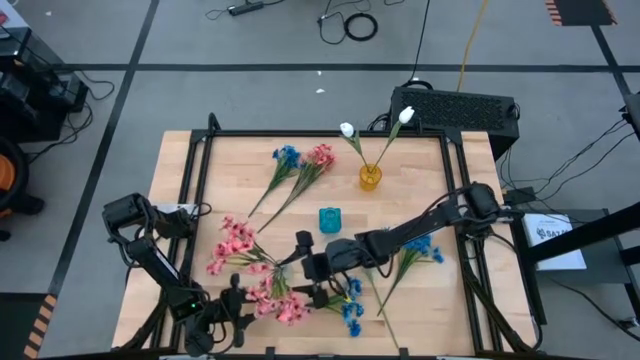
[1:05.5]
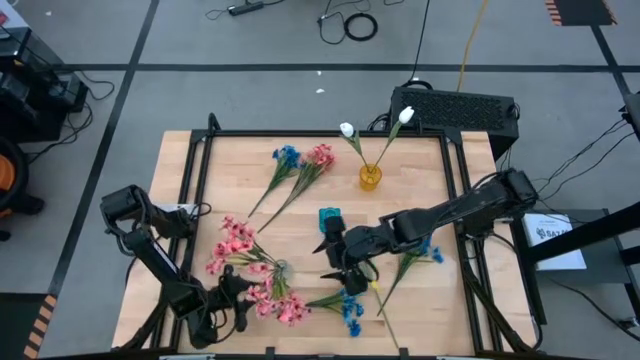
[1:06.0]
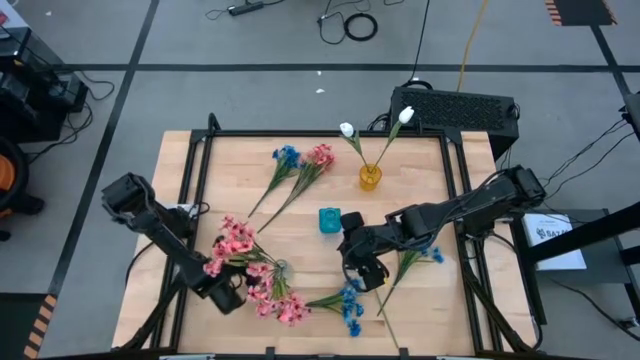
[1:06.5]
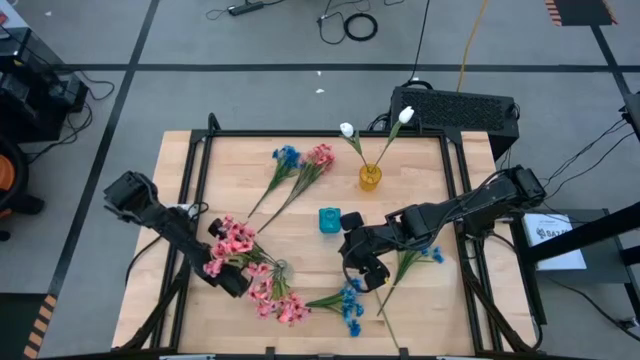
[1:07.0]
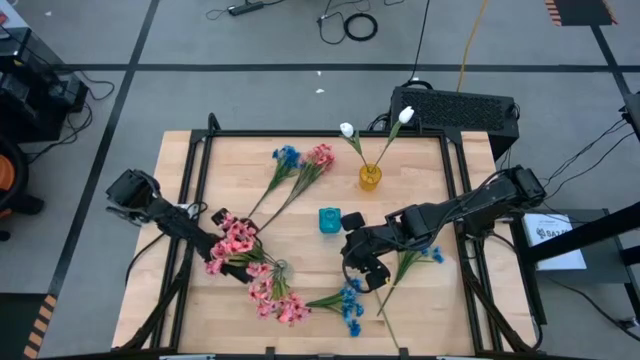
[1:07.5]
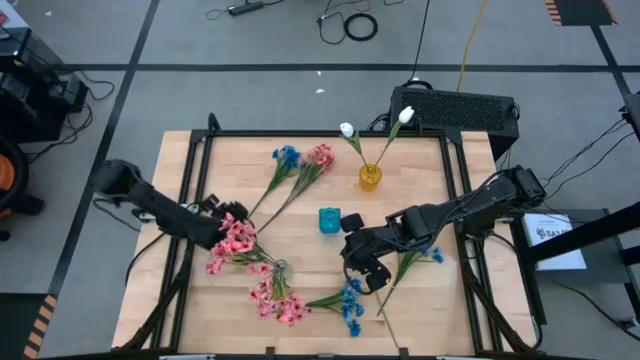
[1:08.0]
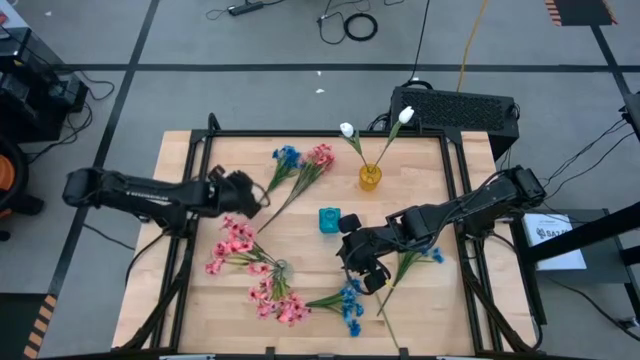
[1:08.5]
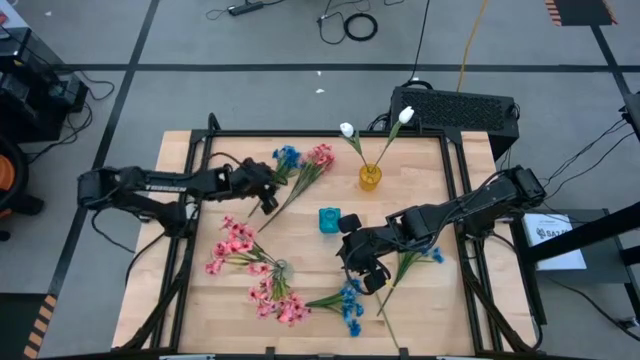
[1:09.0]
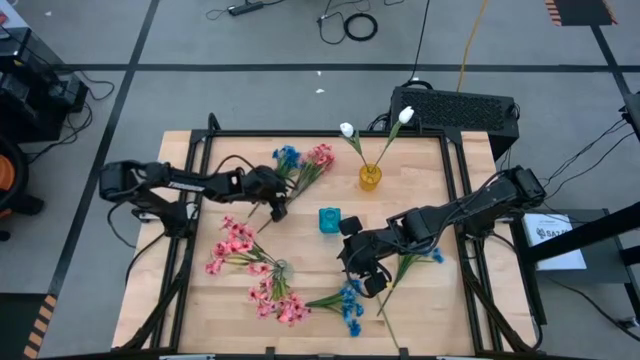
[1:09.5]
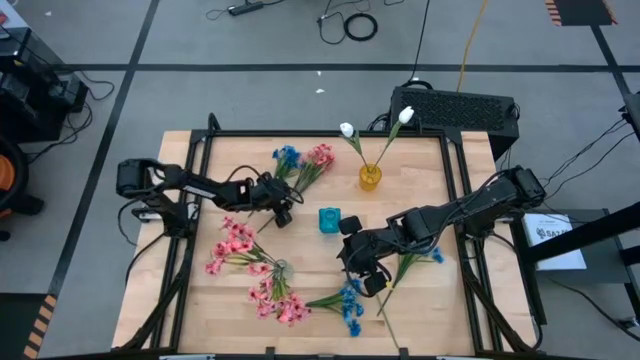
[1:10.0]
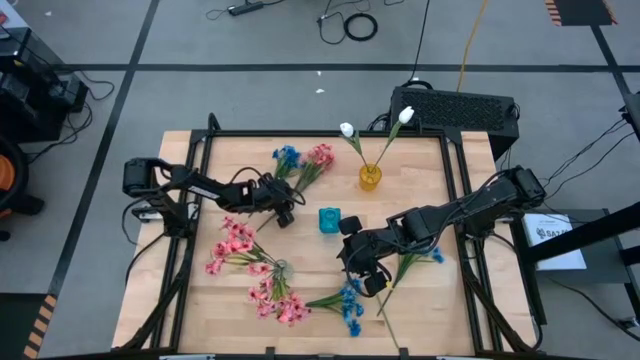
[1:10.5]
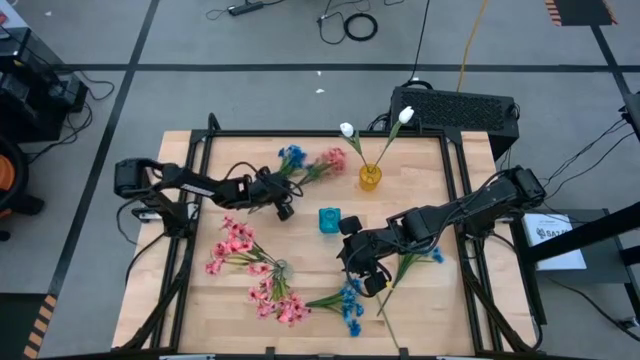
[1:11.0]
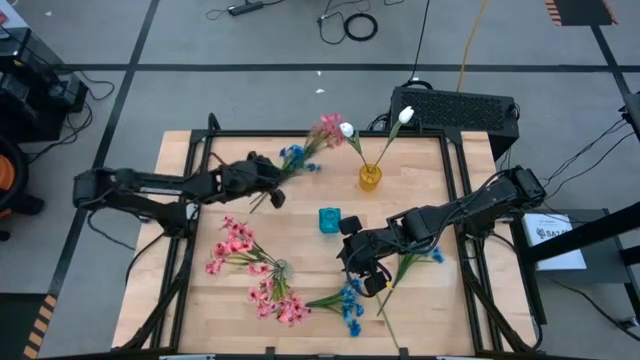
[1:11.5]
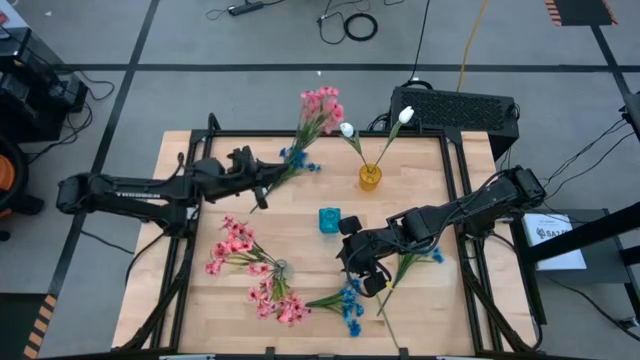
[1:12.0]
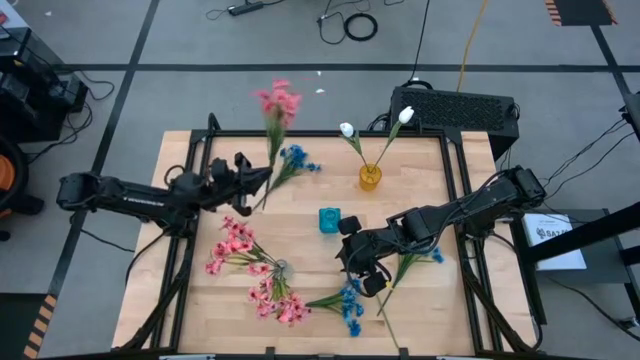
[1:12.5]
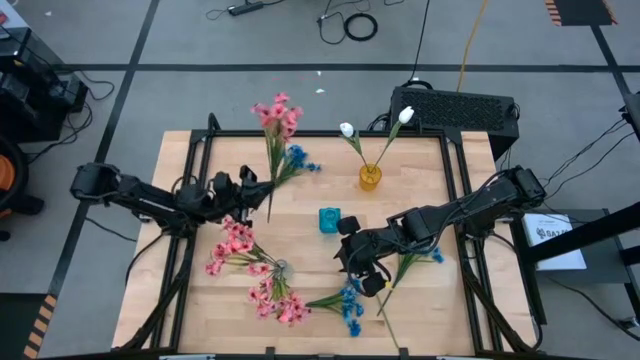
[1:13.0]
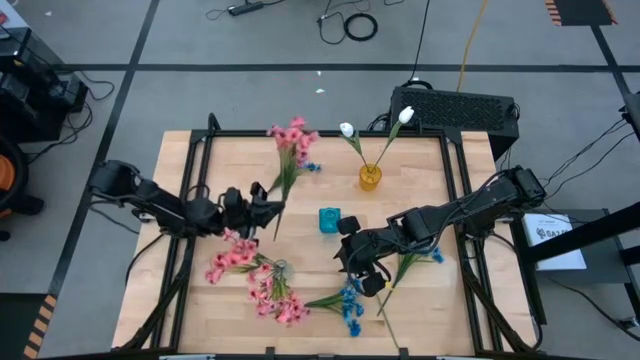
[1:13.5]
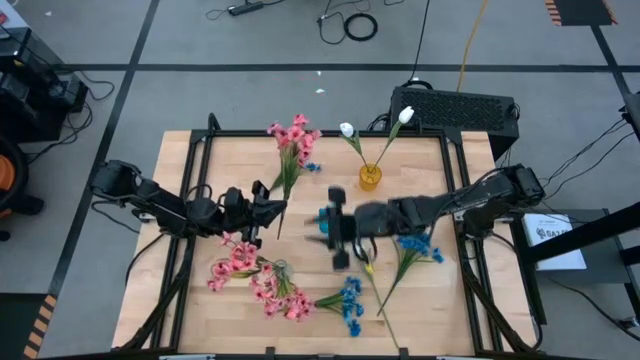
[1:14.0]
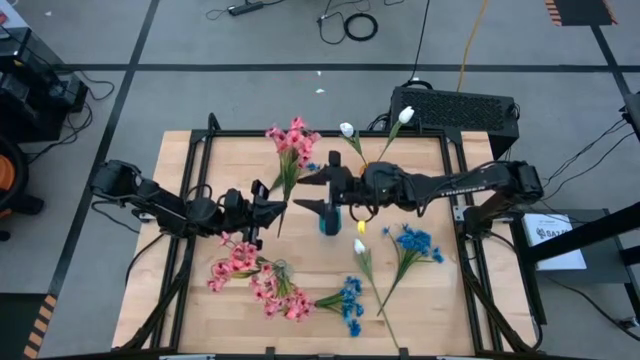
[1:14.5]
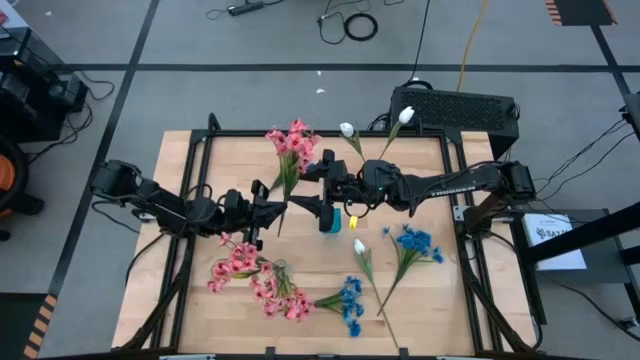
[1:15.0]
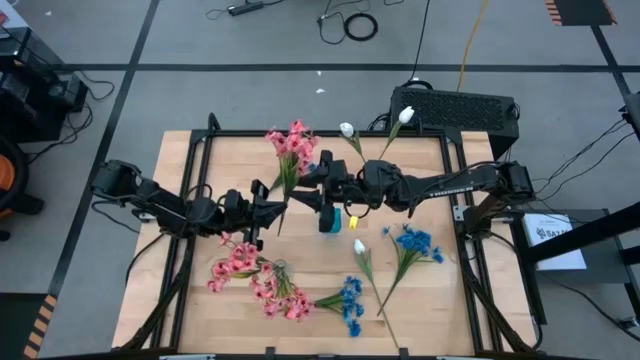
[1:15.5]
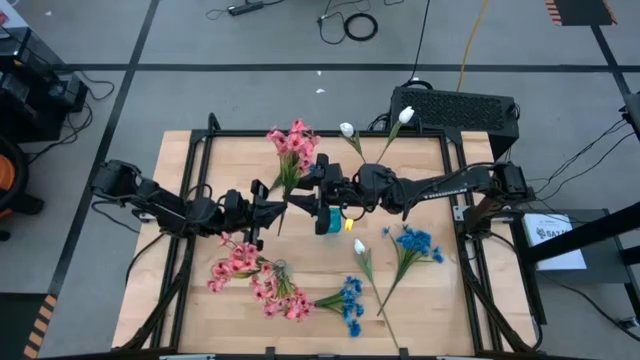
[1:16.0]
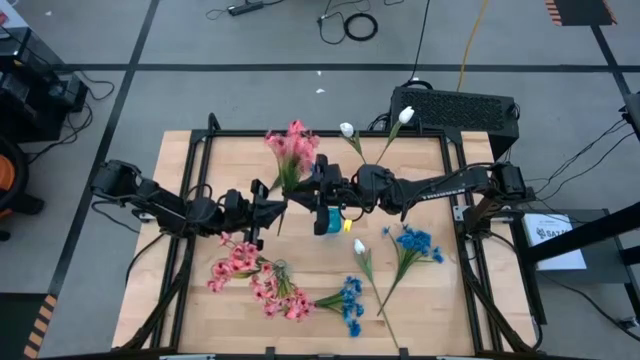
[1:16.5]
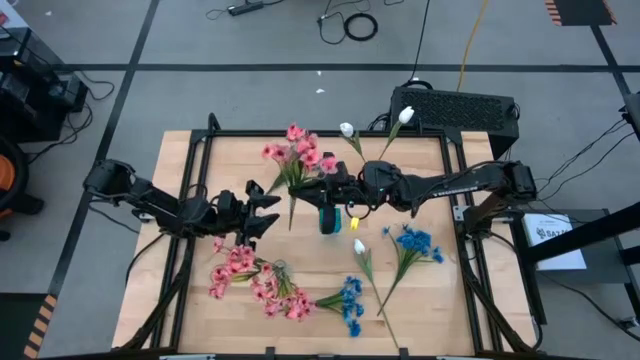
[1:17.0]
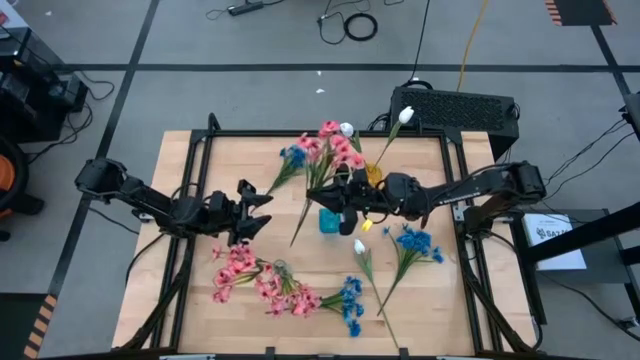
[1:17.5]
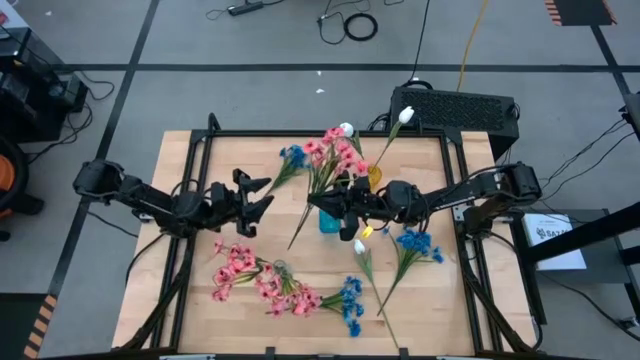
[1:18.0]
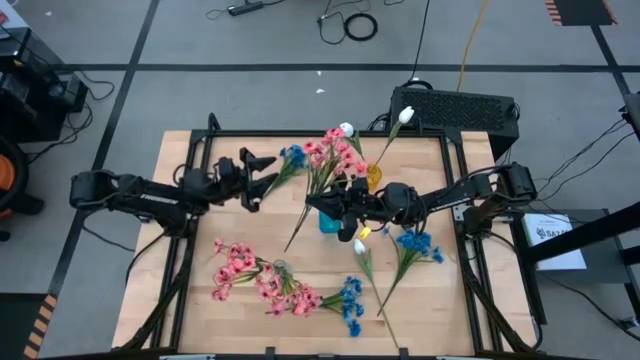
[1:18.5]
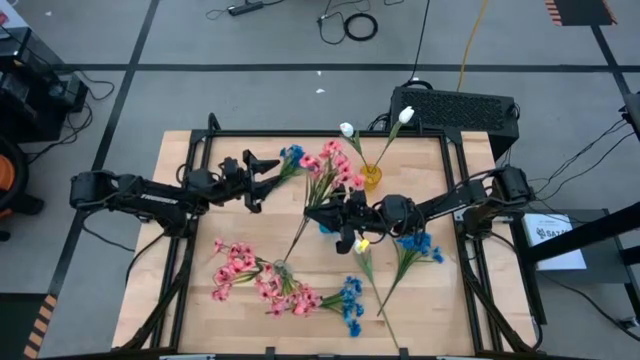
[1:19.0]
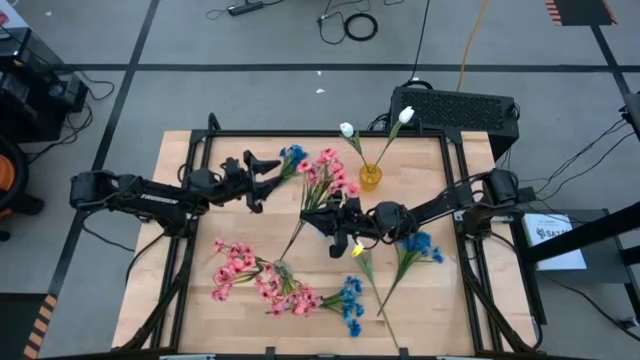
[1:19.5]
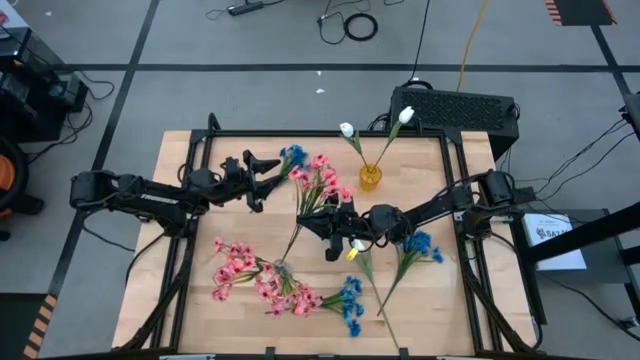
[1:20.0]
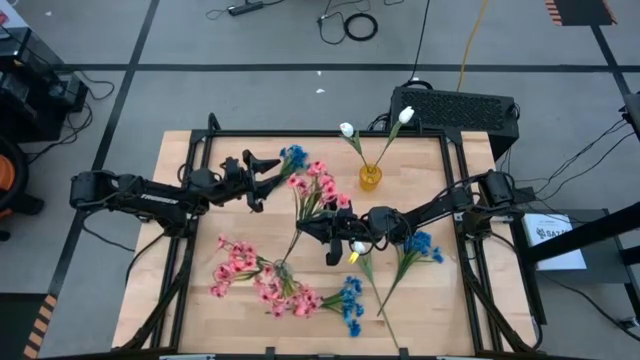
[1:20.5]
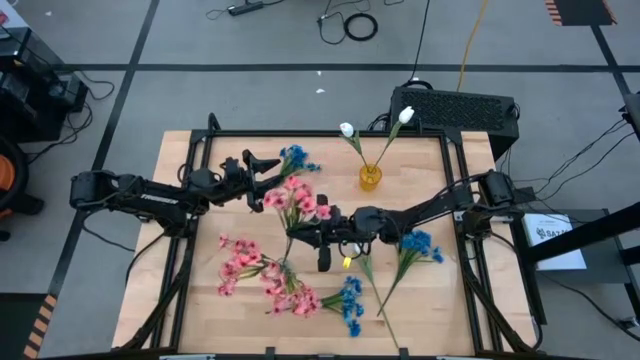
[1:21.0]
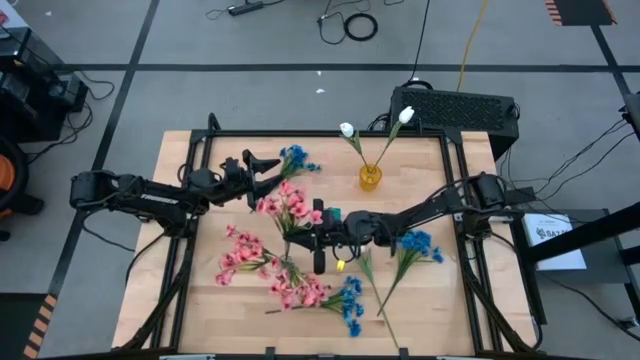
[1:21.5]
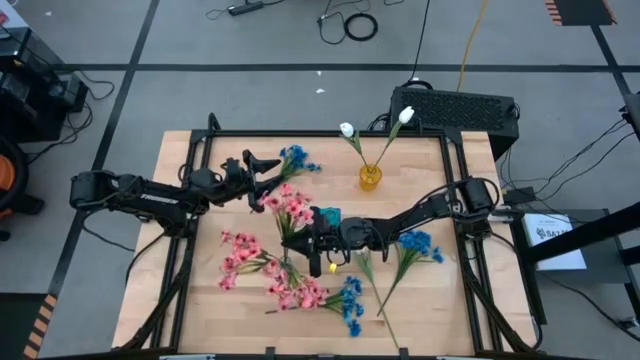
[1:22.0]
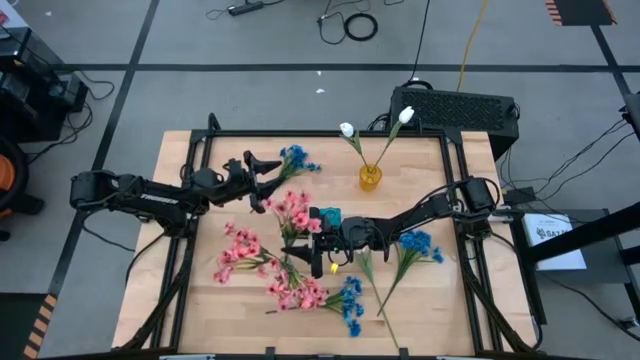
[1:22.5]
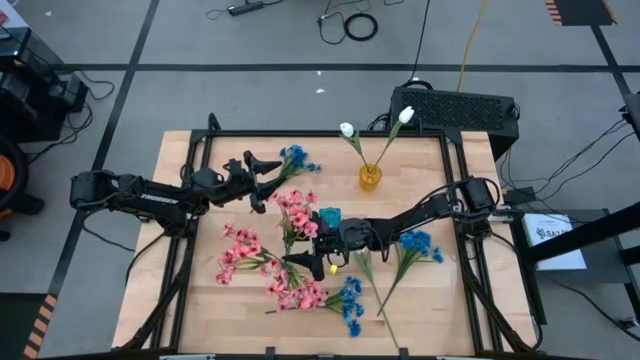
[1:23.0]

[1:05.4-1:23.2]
Task: Sort flowers into vase by color
Put the pink flowers into the transparent vase

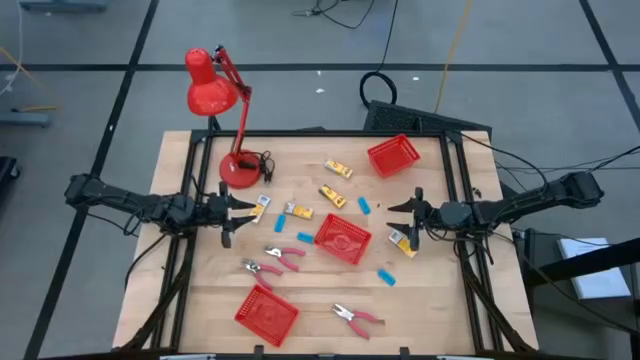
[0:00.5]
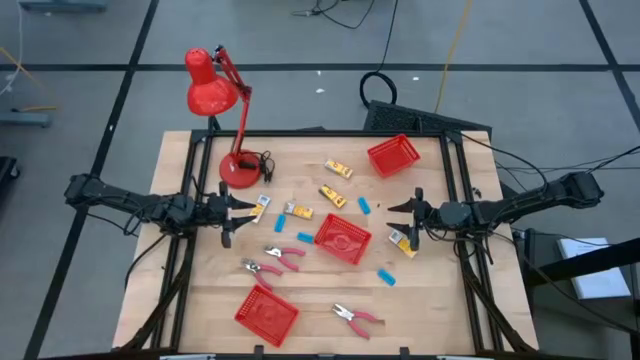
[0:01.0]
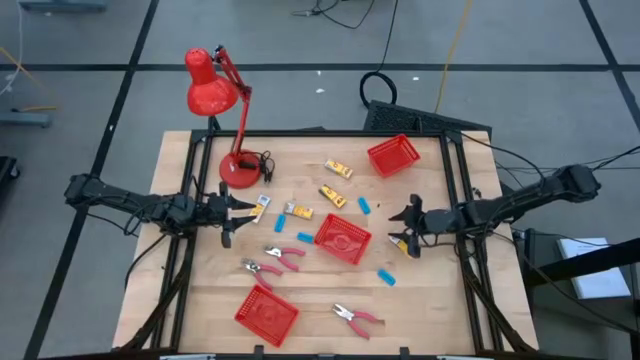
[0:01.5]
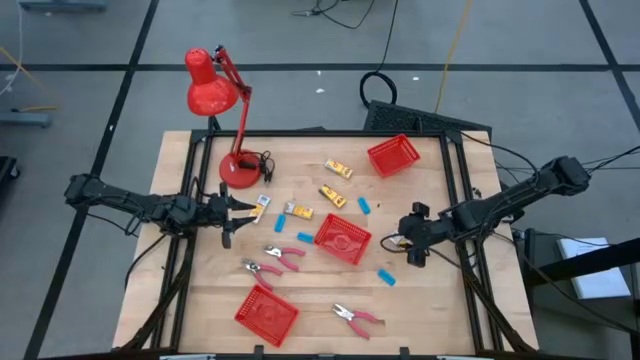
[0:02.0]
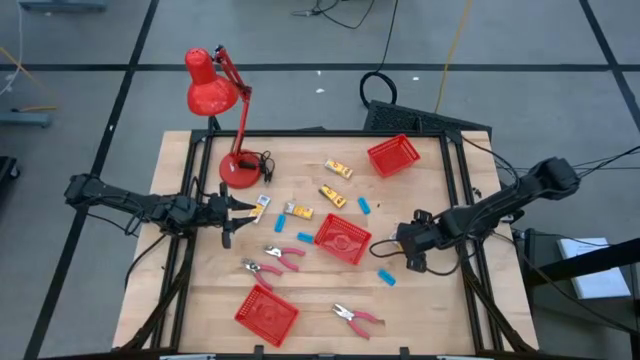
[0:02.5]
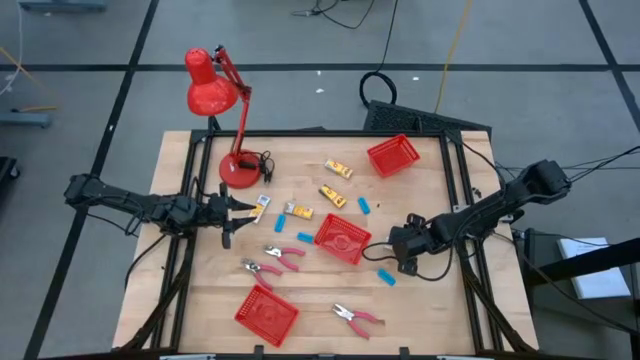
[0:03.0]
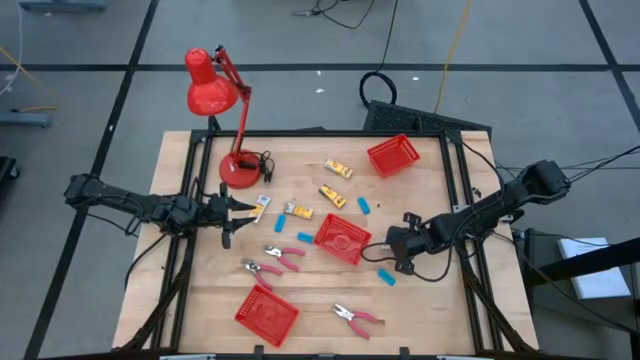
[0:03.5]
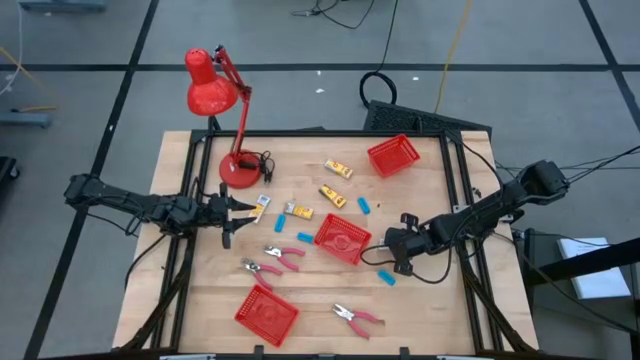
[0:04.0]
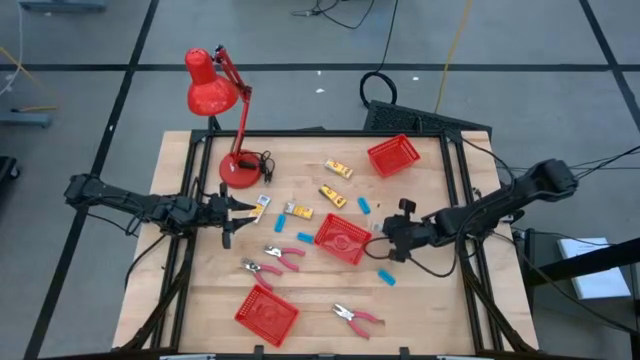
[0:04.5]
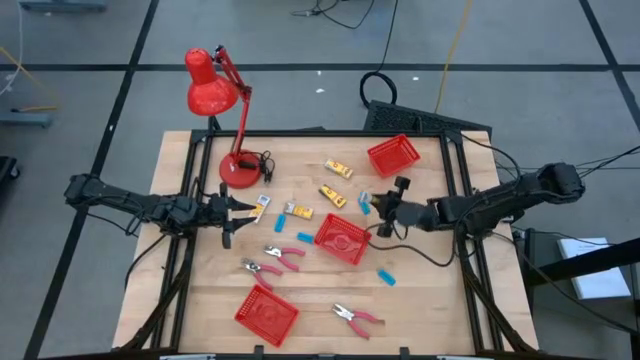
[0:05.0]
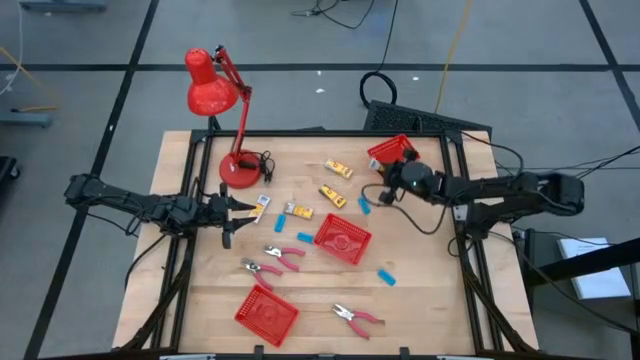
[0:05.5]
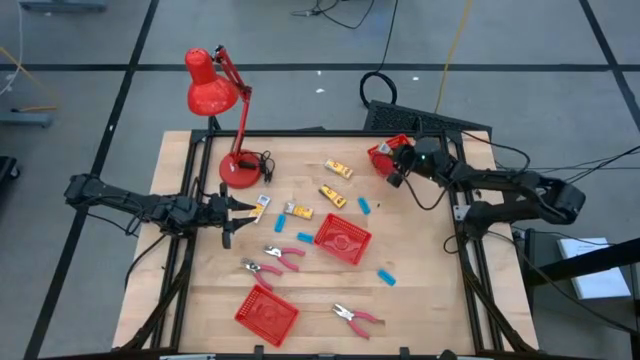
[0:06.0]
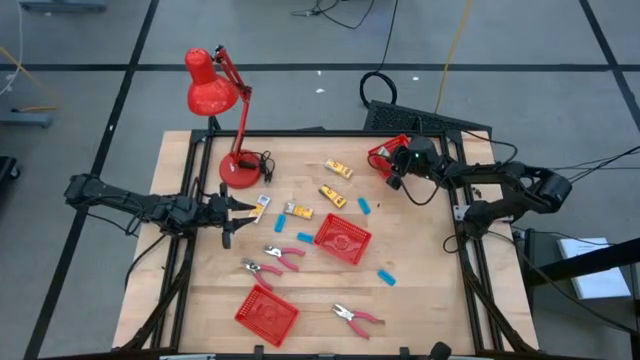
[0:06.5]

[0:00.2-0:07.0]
Task: Pick & Place School Supplies
Put the yellow crayon box into the top red bin
